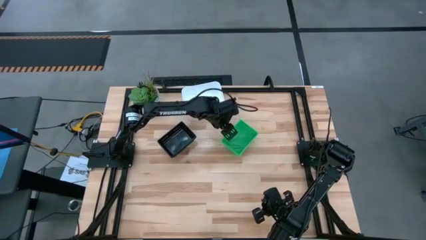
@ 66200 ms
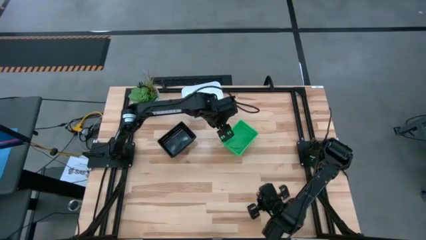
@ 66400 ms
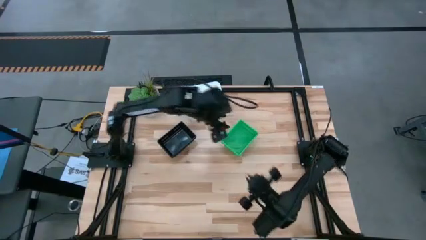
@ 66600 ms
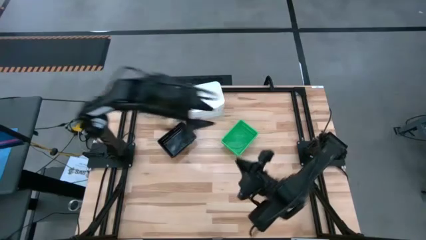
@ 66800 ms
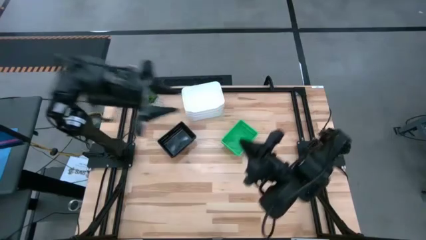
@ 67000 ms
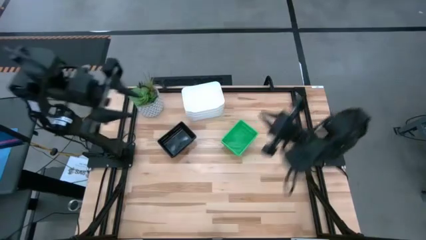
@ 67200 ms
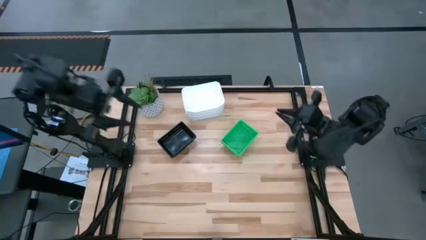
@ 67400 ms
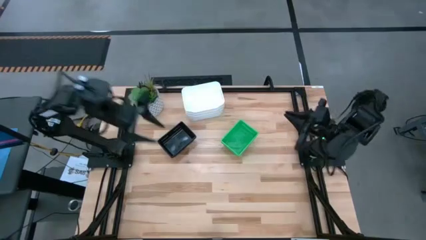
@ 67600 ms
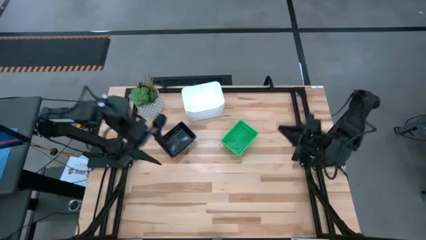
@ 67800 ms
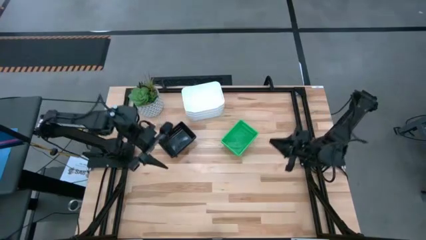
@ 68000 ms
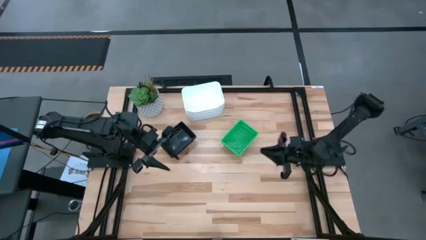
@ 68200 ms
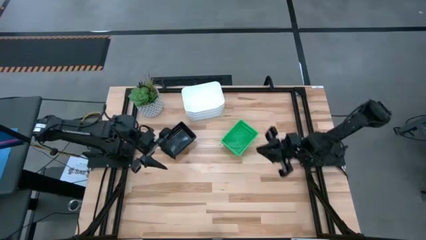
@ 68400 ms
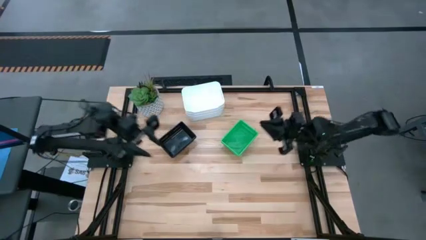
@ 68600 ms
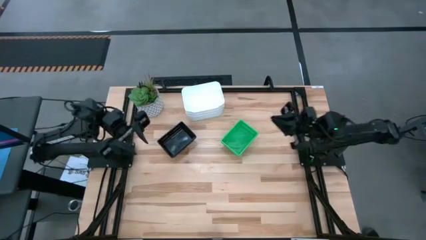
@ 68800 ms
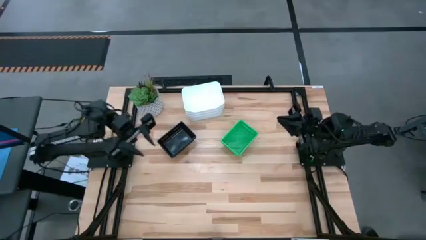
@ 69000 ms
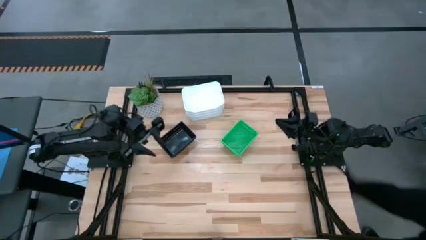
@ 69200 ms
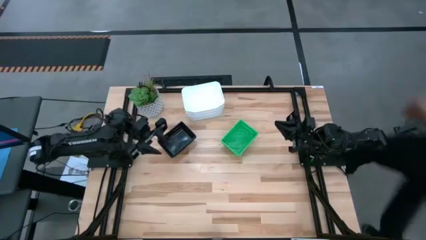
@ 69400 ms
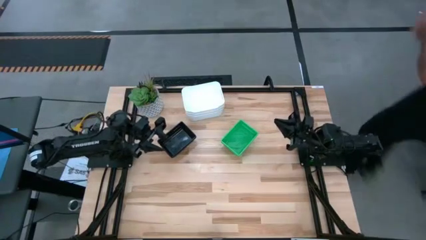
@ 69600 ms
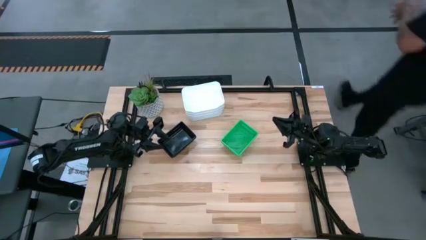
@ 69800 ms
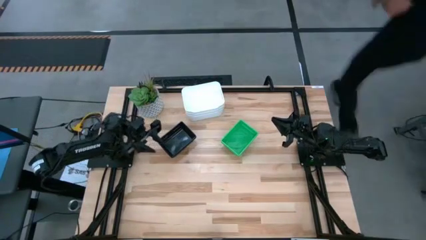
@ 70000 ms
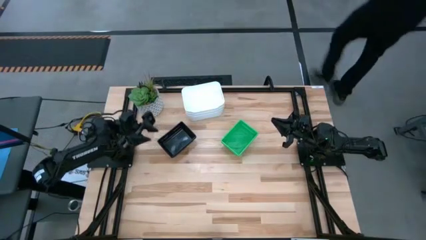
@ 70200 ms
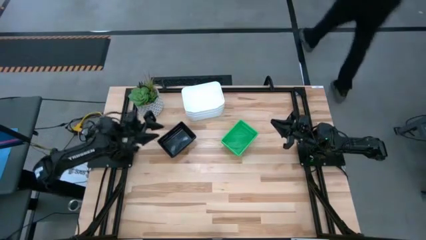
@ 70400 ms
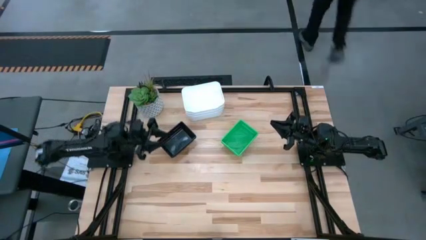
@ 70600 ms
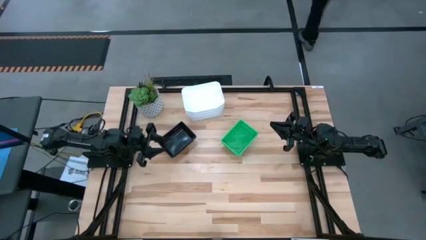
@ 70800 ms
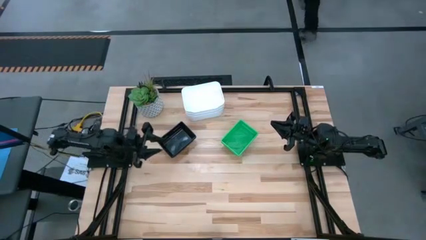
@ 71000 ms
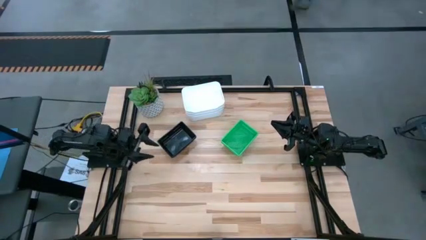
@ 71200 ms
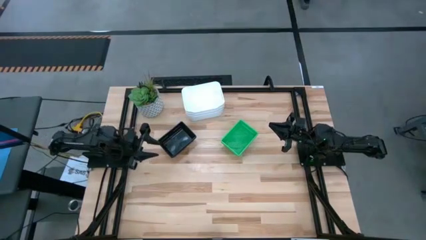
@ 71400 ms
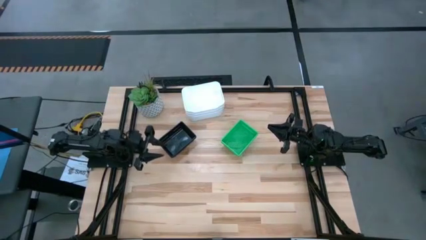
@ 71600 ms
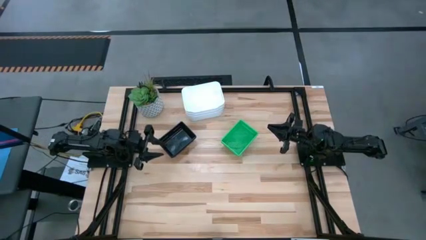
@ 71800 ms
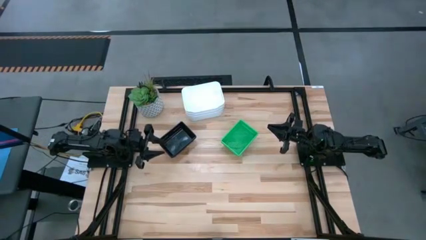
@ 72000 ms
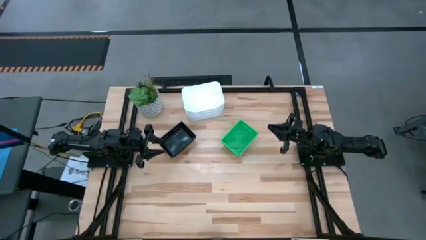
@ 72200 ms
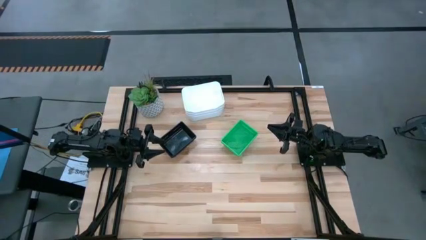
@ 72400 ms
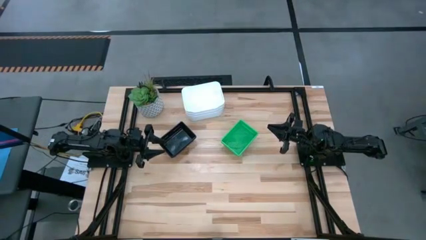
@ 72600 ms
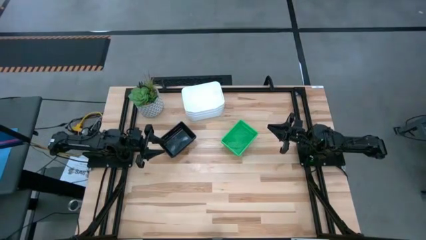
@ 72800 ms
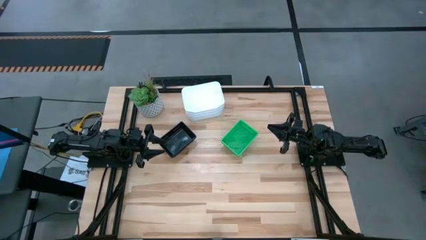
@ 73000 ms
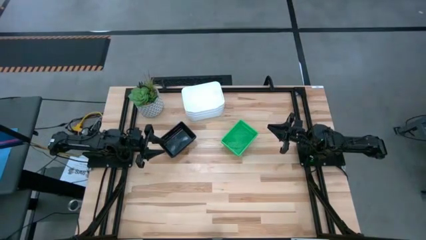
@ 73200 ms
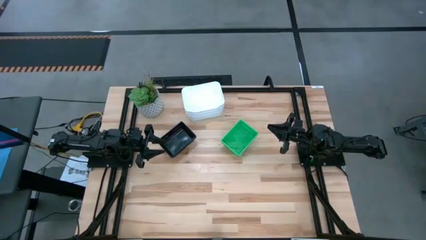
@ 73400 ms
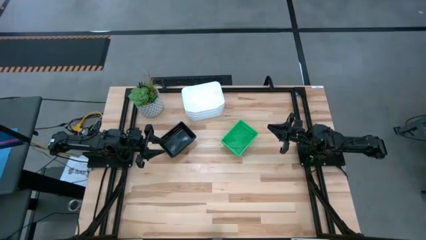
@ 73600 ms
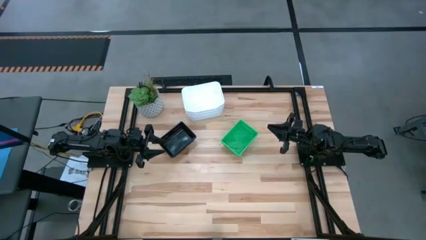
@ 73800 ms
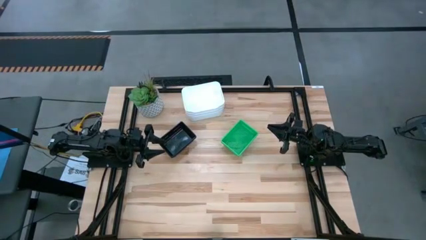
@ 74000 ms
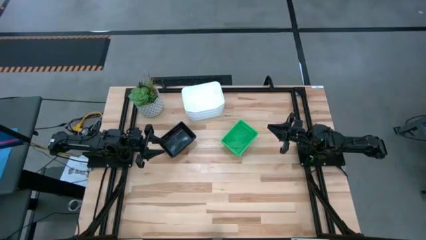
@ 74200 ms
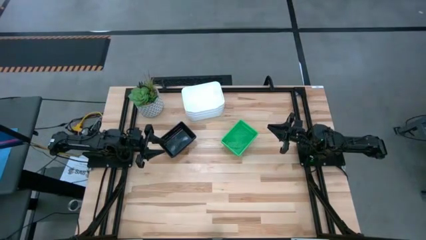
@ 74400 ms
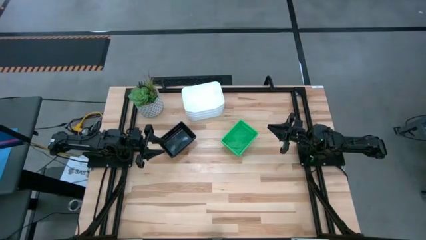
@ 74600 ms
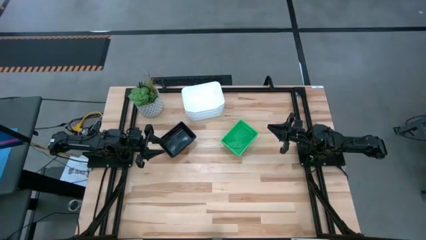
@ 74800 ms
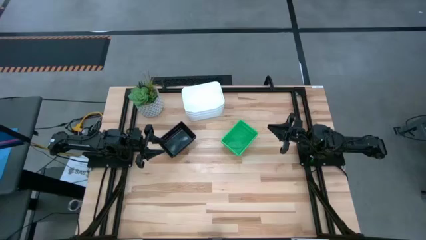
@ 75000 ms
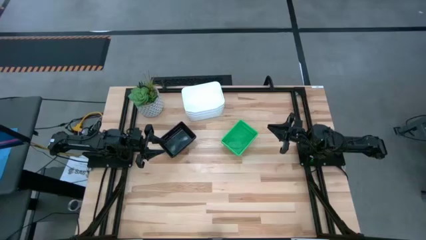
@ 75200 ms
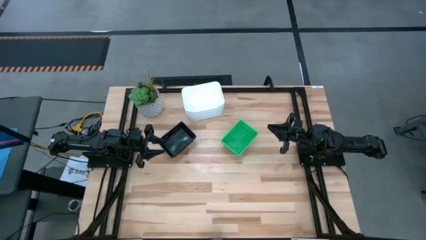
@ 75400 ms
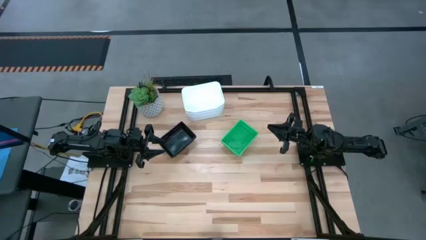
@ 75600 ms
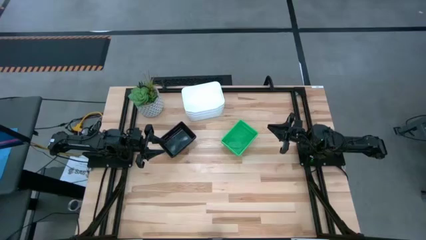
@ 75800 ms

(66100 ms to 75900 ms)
Return to Home Position
